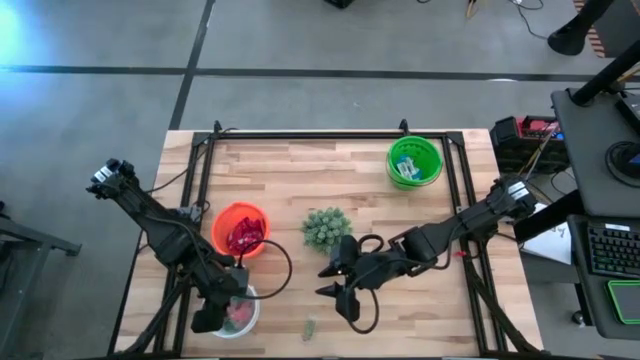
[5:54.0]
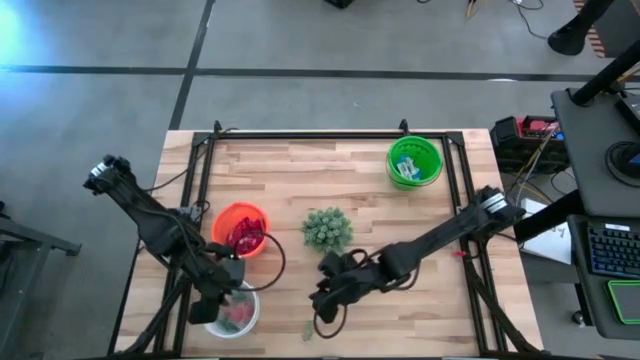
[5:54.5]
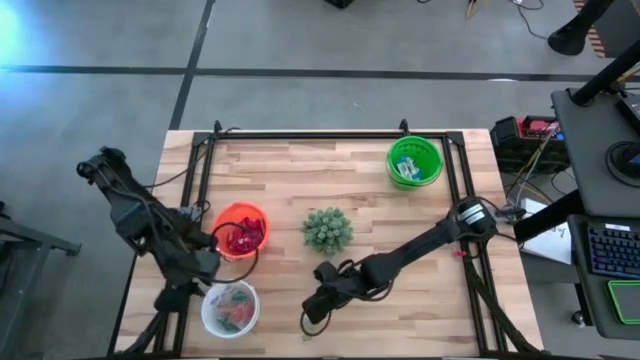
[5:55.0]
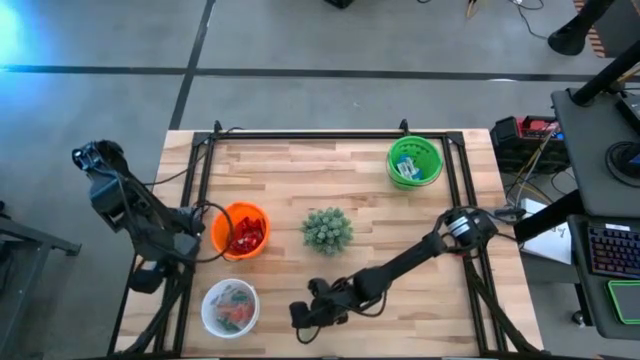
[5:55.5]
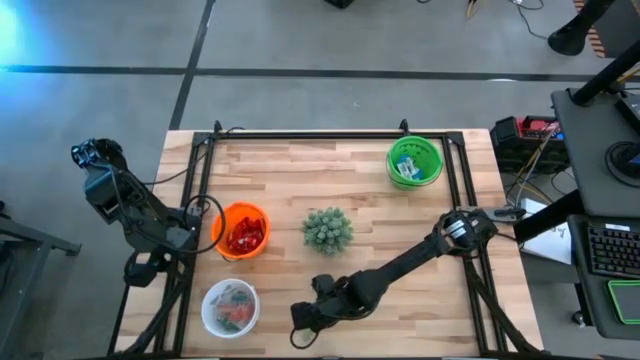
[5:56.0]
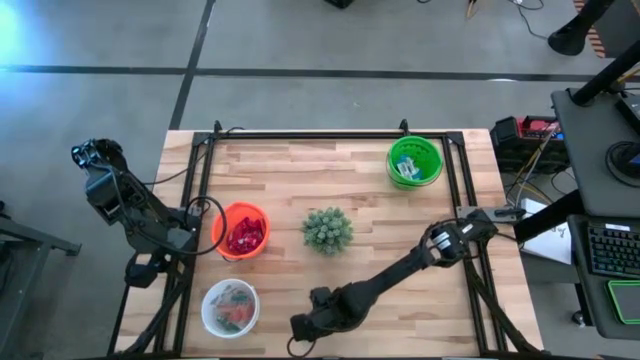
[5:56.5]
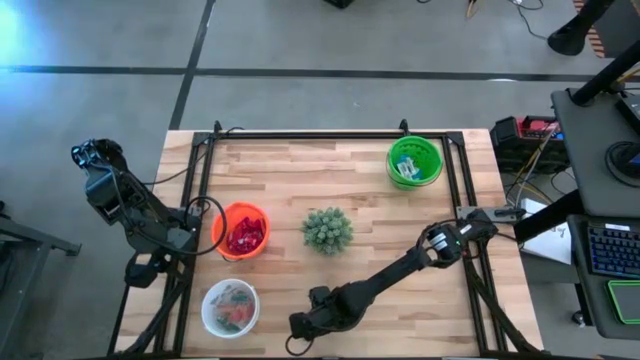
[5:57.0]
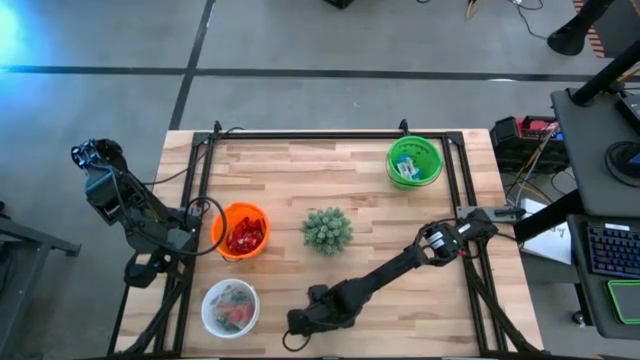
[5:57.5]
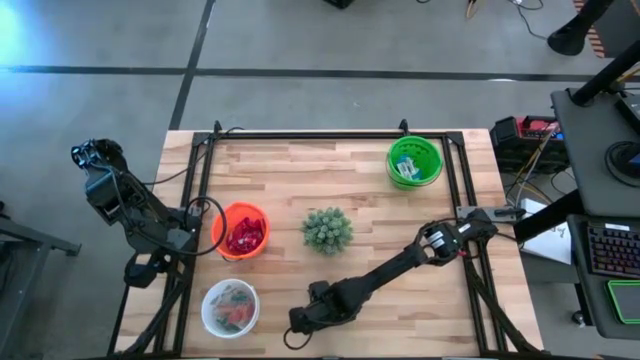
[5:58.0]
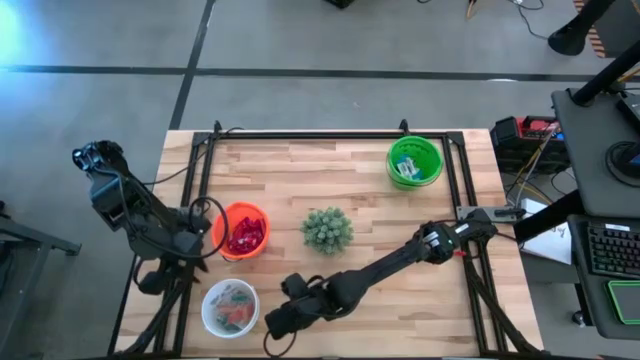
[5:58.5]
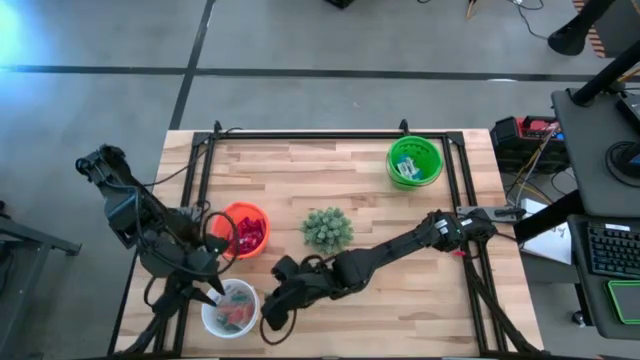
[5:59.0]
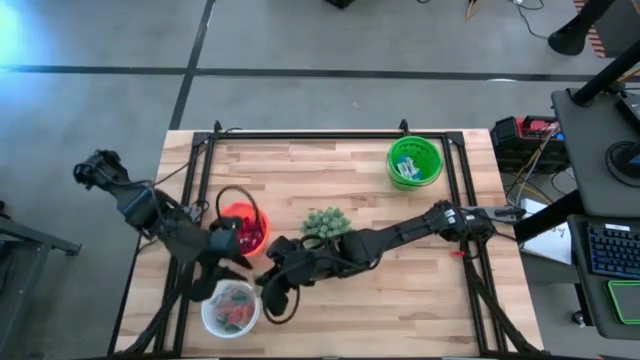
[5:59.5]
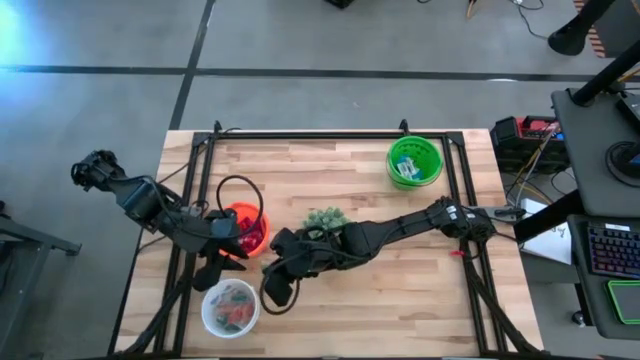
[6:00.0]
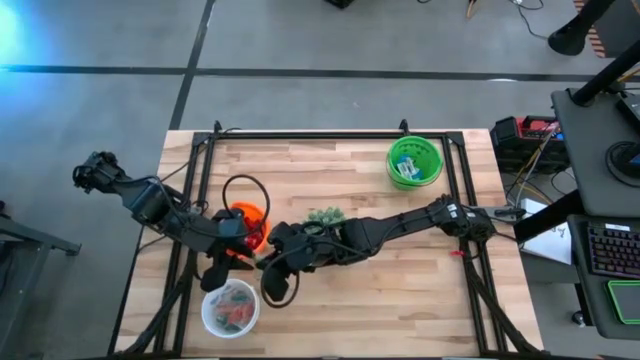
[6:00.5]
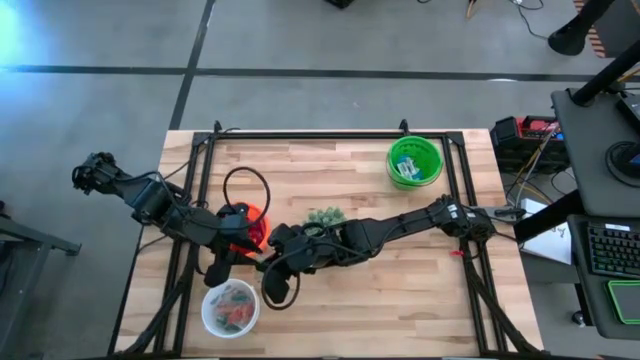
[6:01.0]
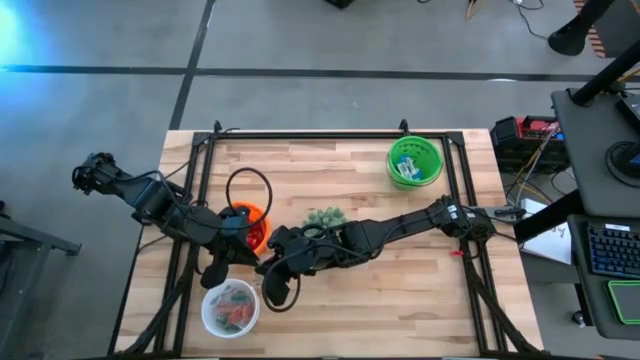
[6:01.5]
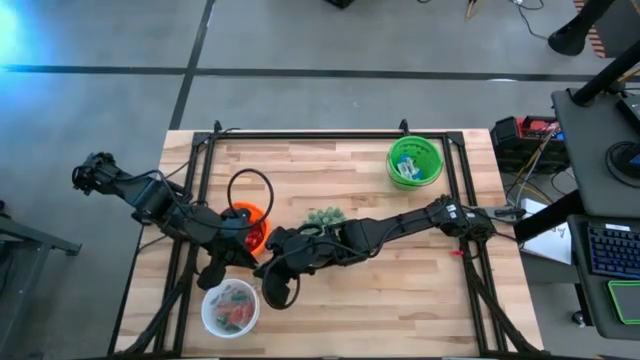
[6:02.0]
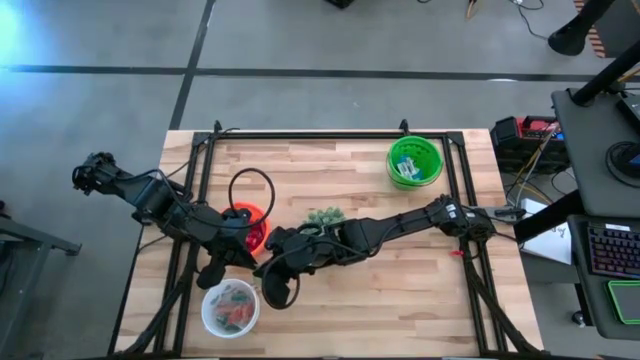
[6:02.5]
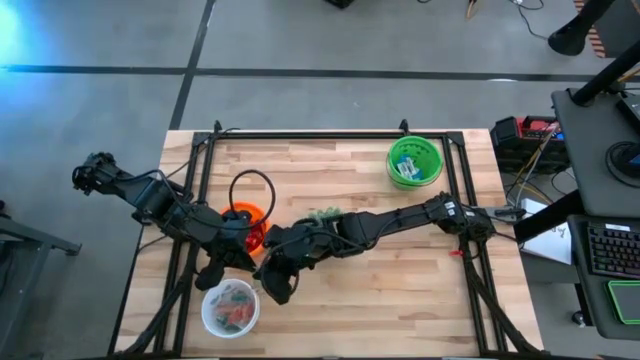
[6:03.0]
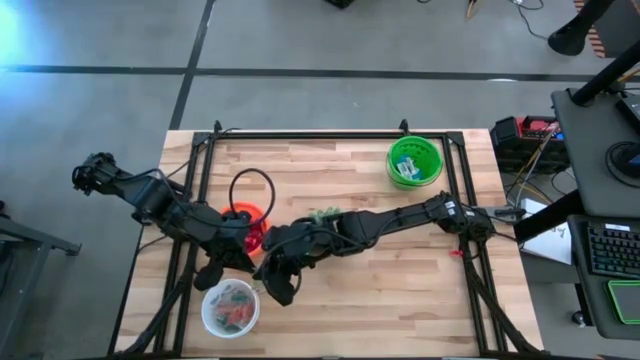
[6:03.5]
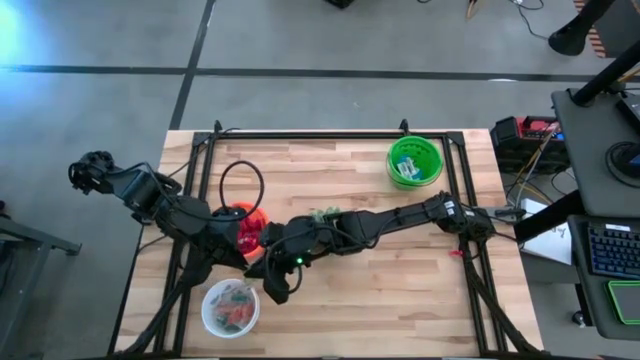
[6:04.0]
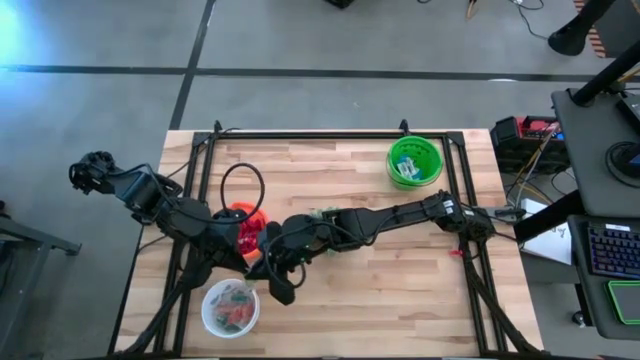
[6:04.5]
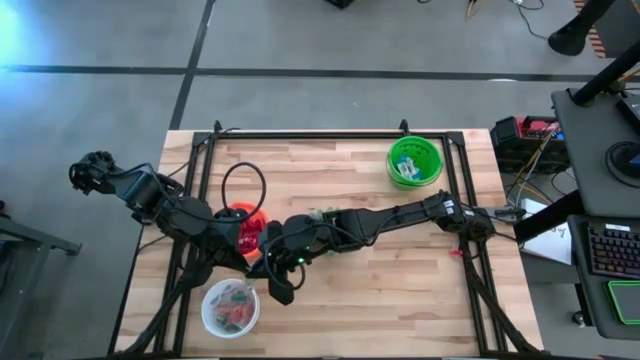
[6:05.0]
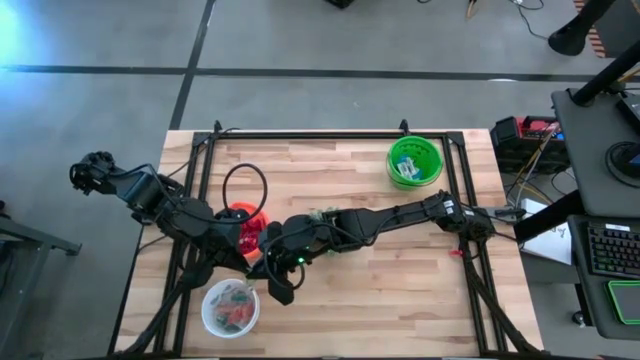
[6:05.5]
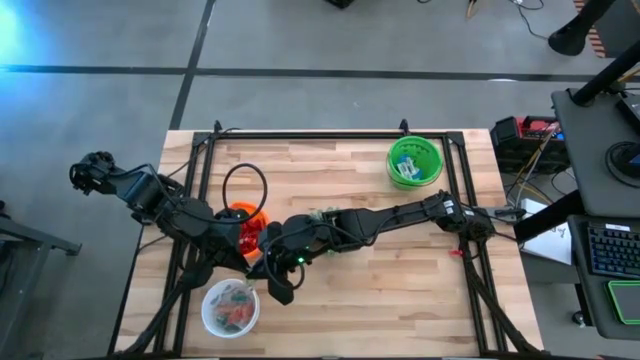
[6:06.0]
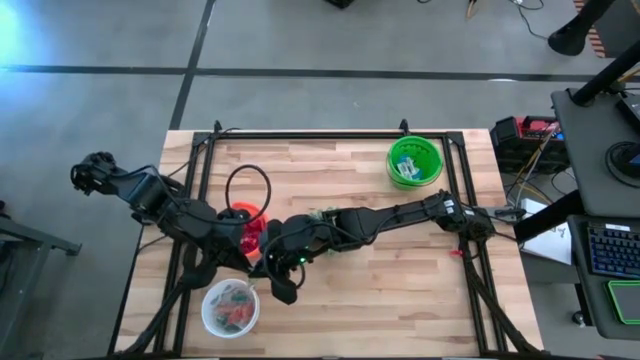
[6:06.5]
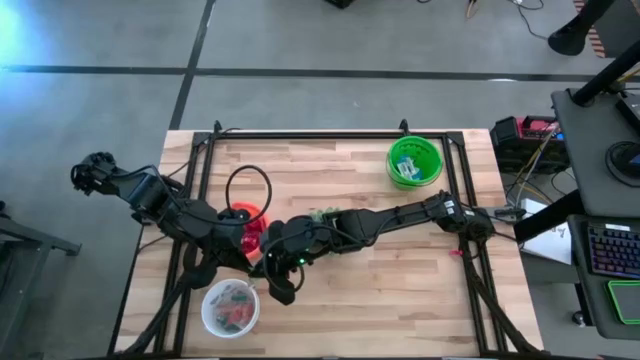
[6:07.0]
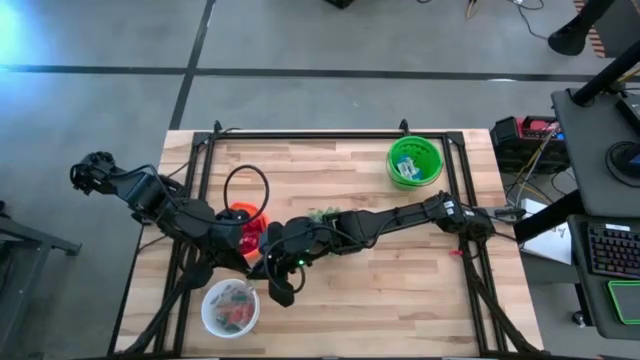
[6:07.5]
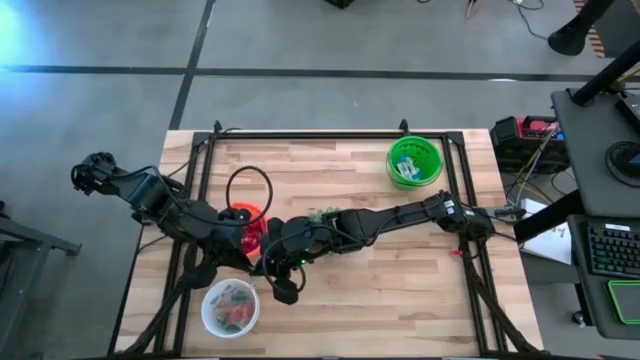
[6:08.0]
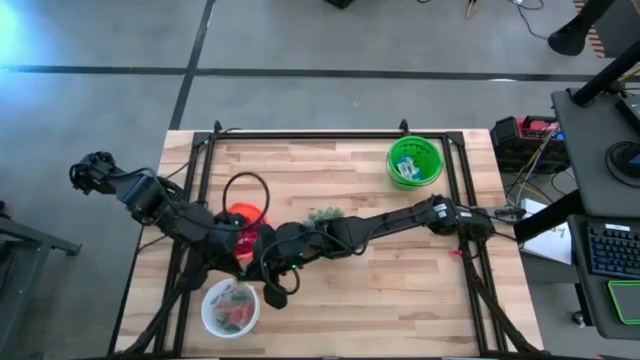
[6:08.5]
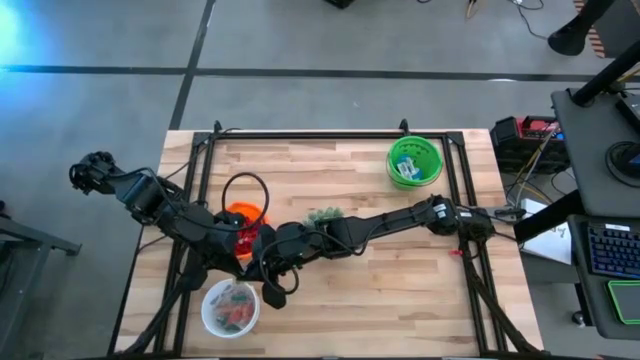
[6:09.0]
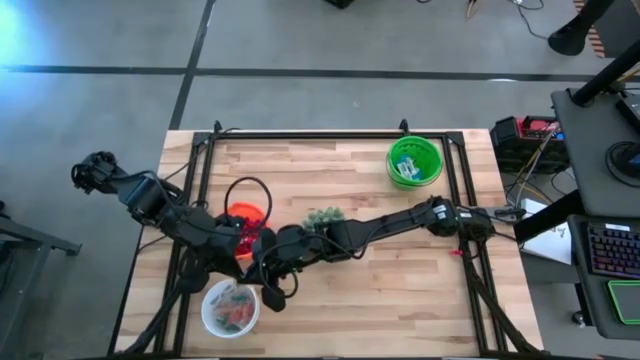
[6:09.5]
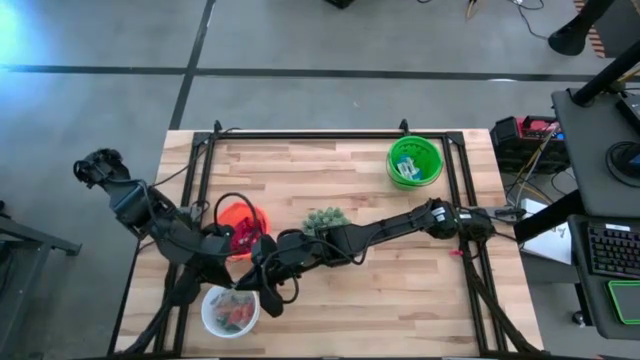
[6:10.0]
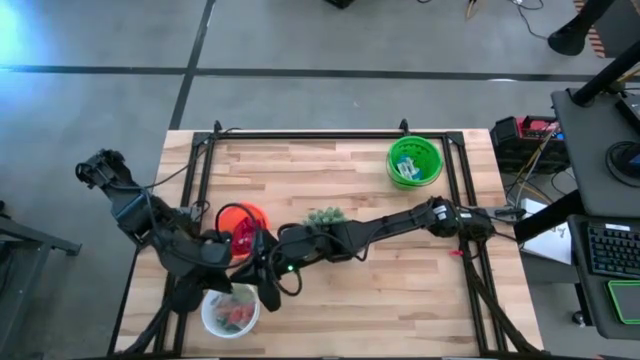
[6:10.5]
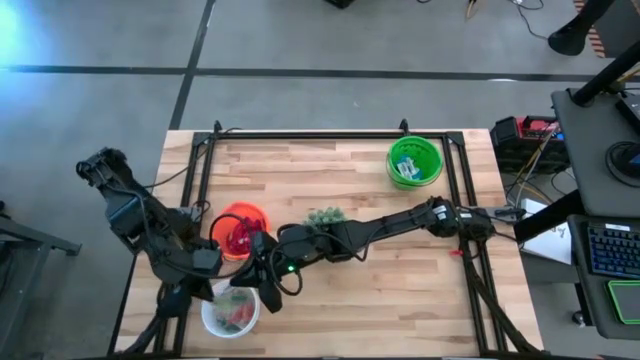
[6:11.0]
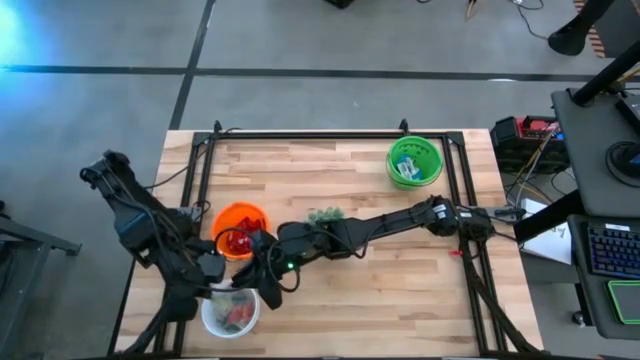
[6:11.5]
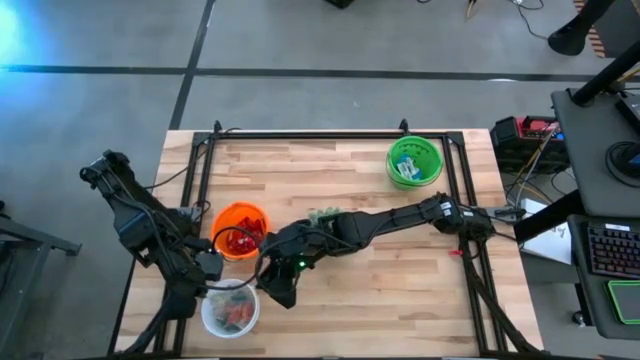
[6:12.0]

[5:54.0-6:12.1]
Task: Sort candy
Put the green gummy into the white bucket

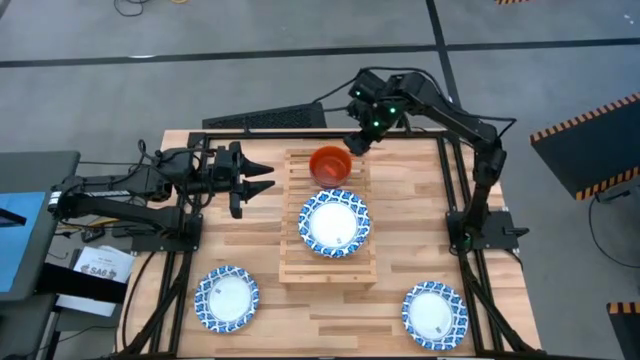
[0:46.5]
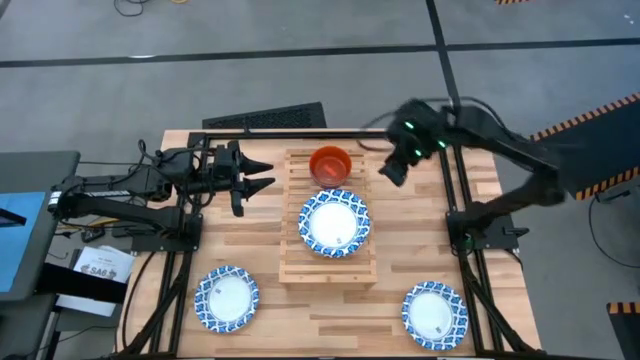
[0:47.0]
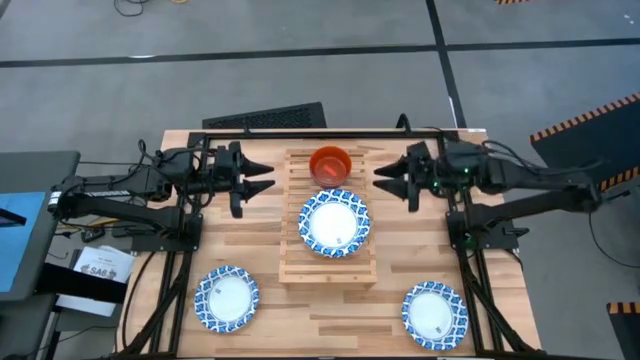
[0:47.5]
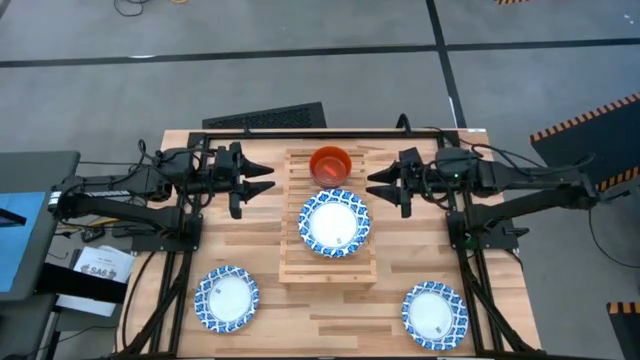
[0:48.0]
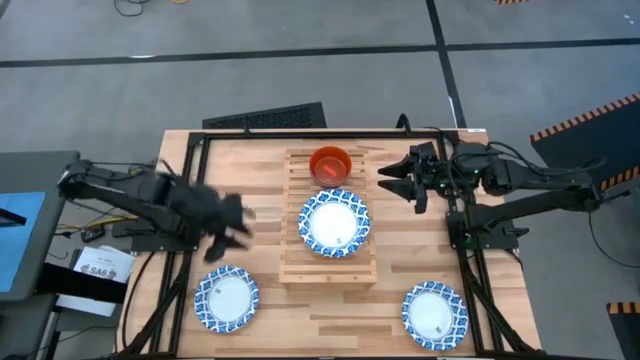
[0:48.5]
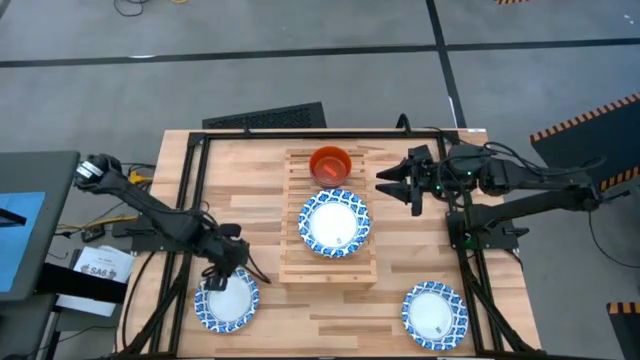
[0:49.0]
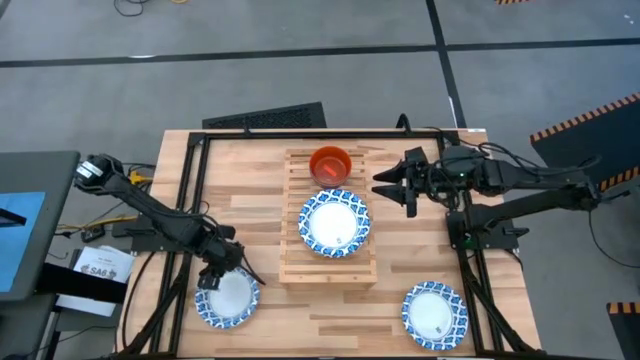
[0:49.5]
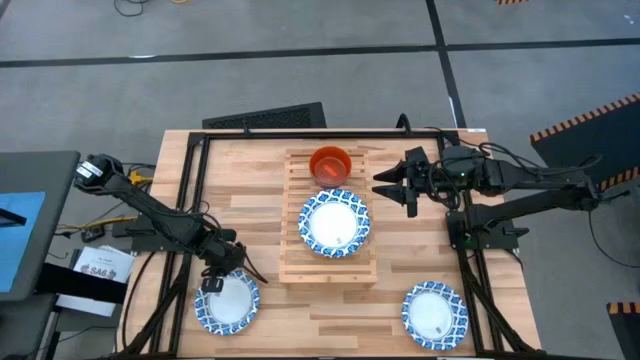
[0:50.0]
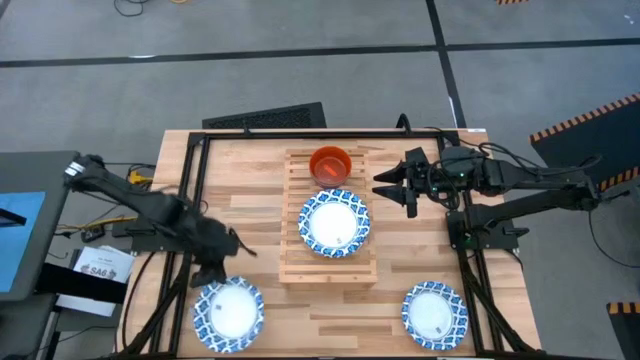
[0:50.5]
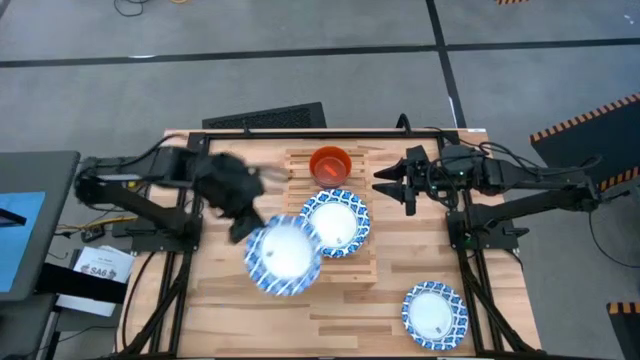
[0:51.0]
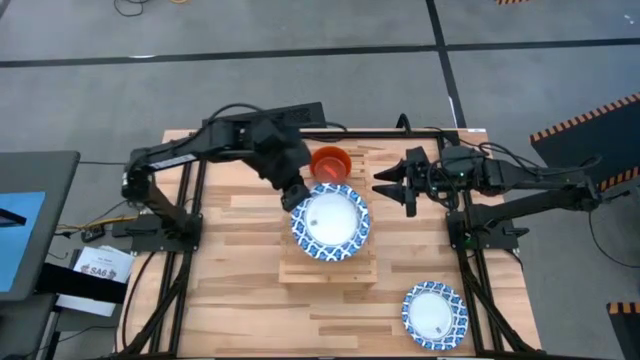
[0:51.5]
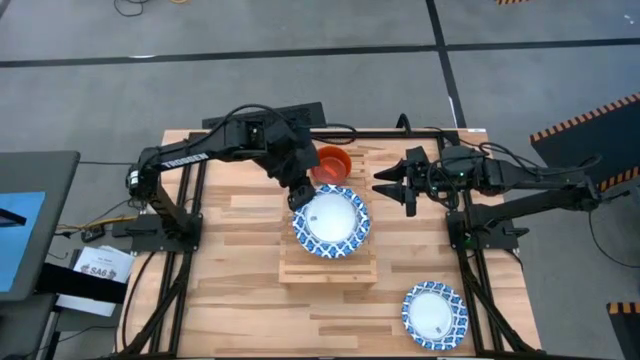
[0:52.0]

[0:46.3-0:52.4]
Task: Place and stack bowls onto a shelf
Stack the left white patterned bowl on top of the white patterned bowl on the shelf
